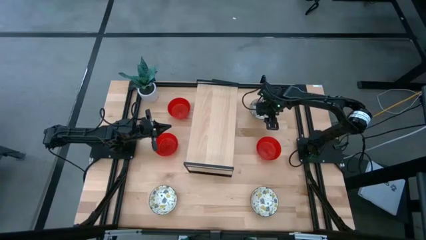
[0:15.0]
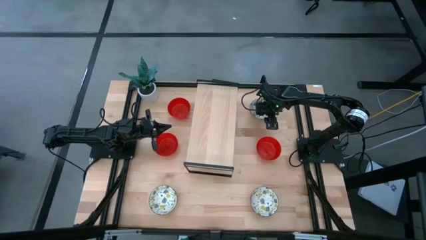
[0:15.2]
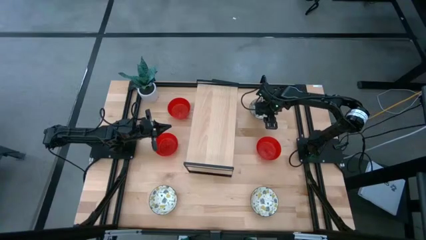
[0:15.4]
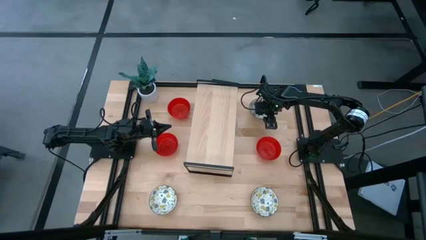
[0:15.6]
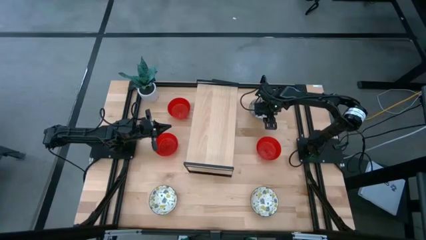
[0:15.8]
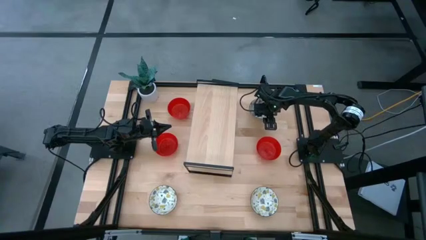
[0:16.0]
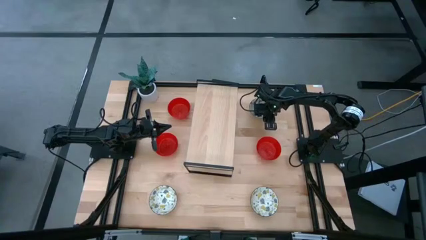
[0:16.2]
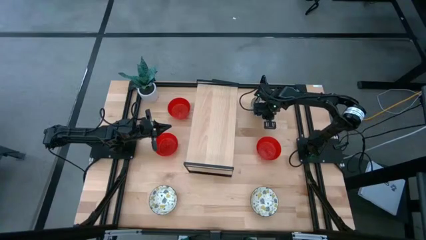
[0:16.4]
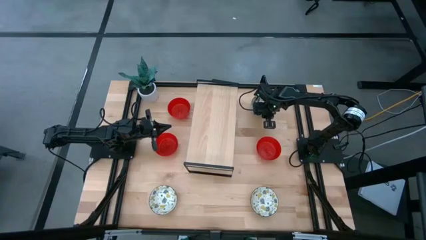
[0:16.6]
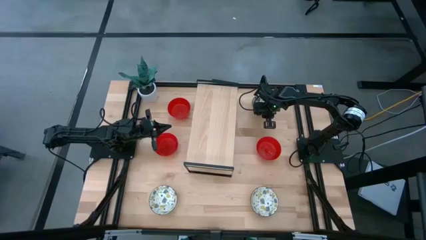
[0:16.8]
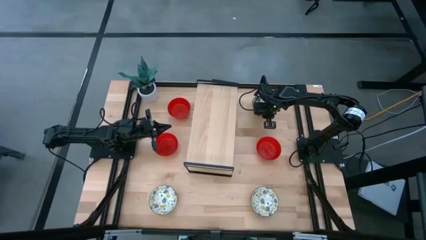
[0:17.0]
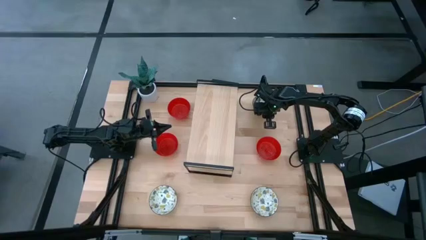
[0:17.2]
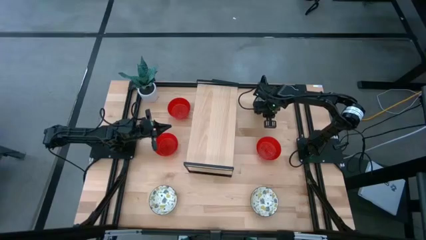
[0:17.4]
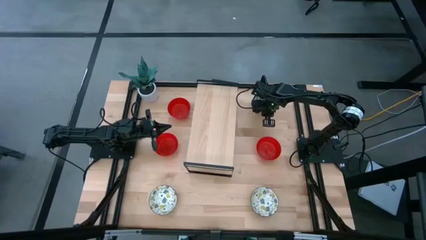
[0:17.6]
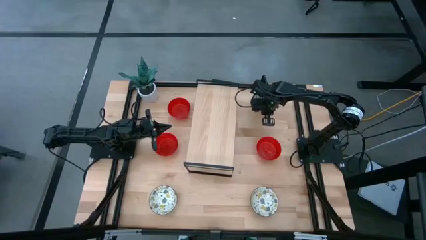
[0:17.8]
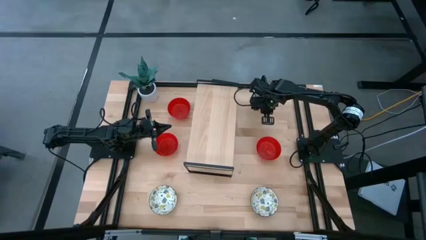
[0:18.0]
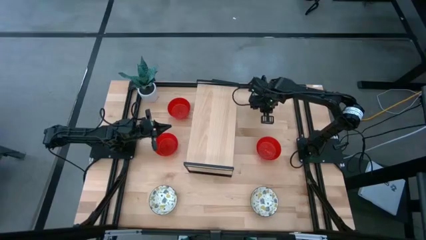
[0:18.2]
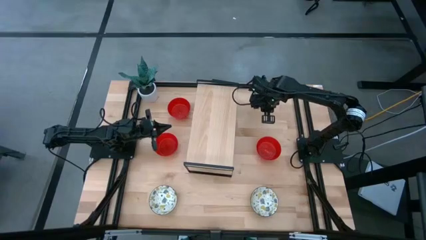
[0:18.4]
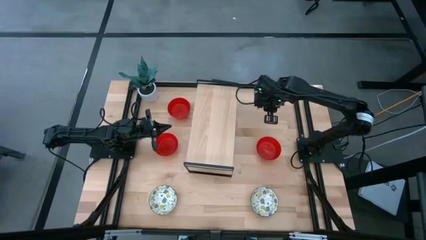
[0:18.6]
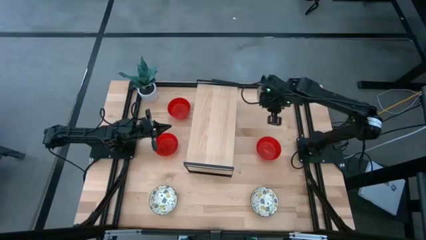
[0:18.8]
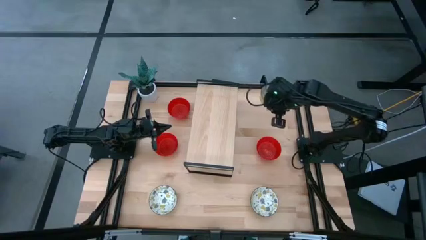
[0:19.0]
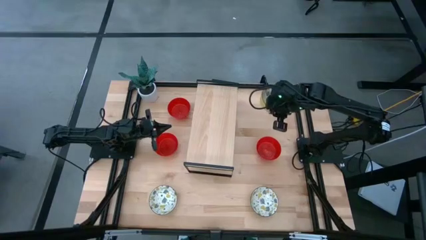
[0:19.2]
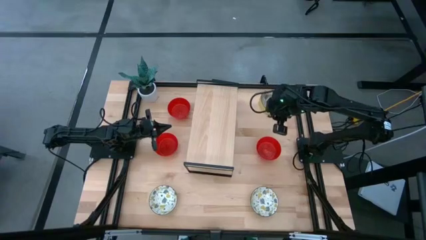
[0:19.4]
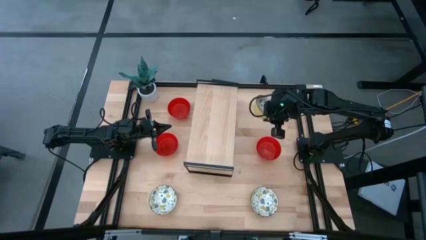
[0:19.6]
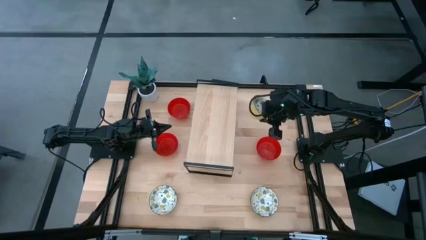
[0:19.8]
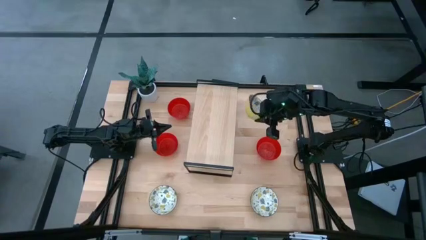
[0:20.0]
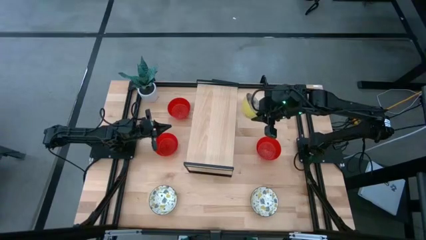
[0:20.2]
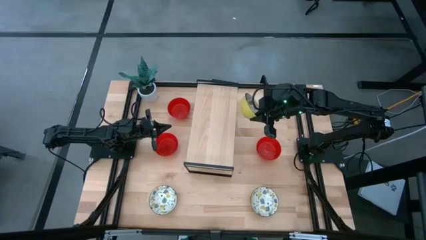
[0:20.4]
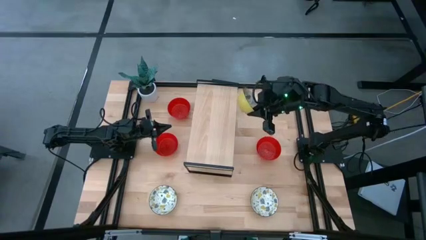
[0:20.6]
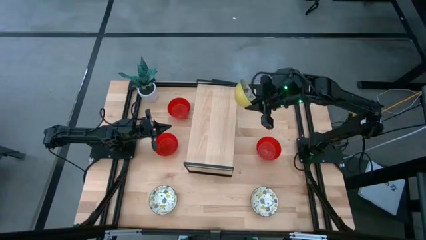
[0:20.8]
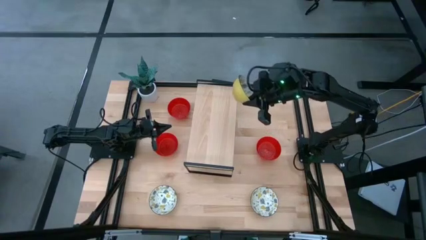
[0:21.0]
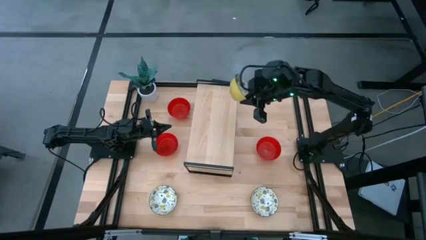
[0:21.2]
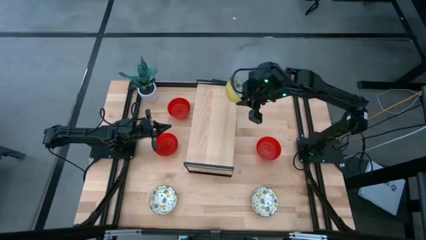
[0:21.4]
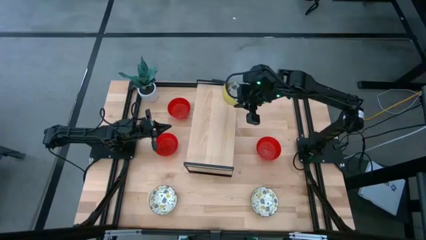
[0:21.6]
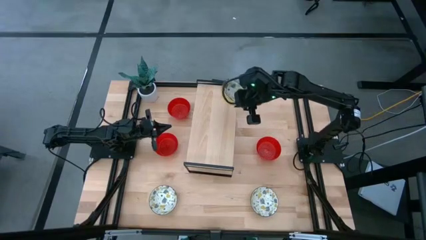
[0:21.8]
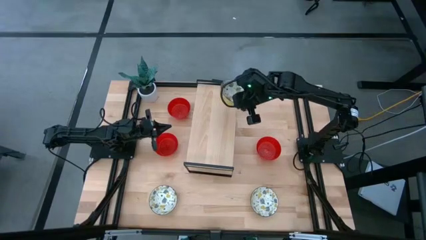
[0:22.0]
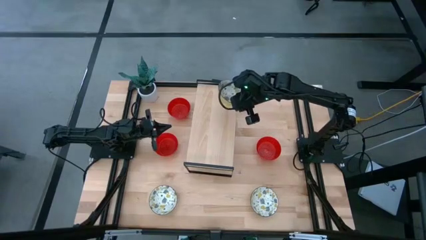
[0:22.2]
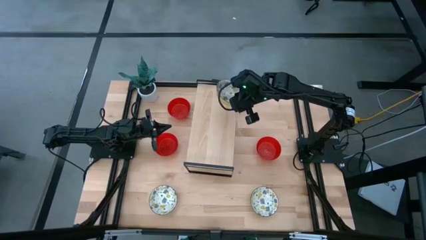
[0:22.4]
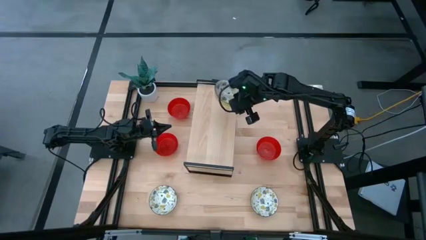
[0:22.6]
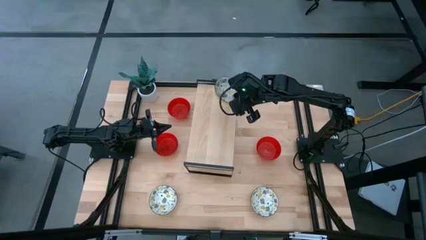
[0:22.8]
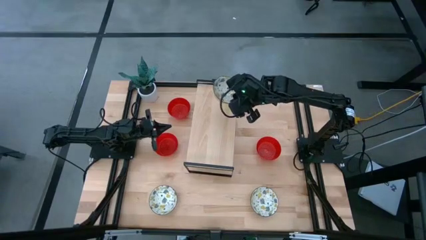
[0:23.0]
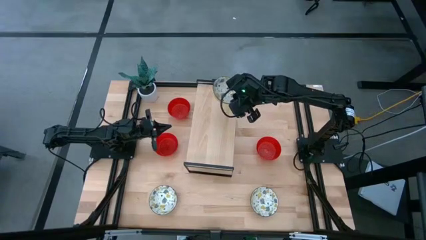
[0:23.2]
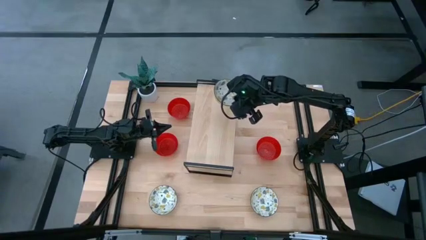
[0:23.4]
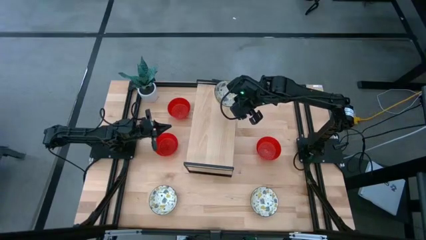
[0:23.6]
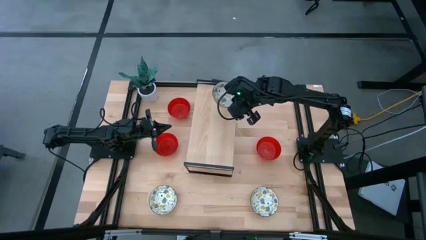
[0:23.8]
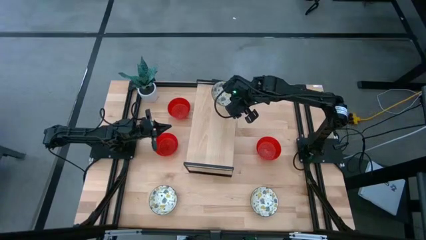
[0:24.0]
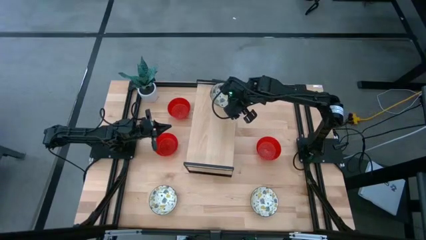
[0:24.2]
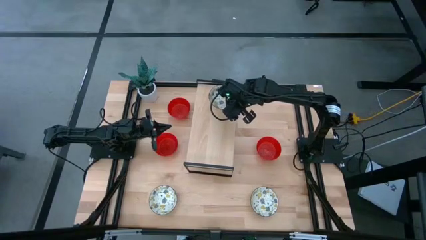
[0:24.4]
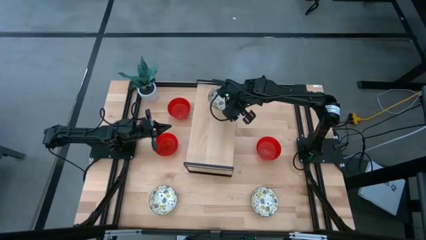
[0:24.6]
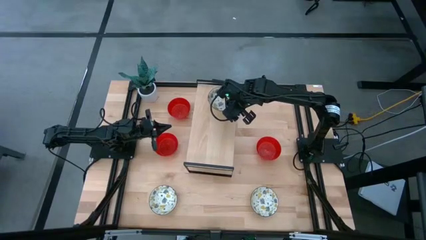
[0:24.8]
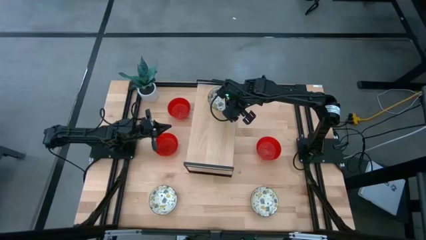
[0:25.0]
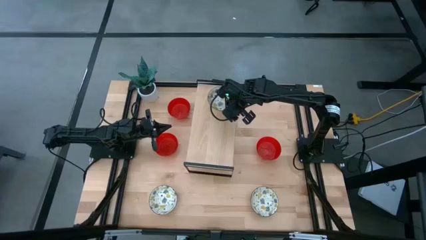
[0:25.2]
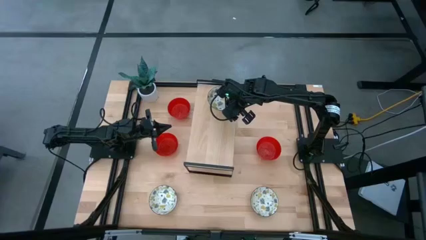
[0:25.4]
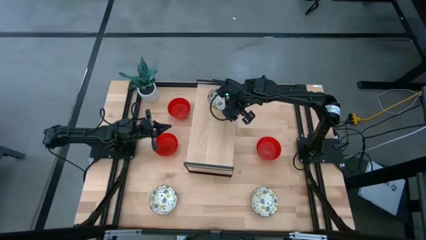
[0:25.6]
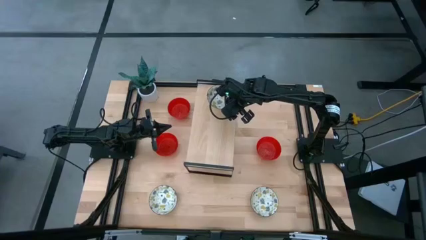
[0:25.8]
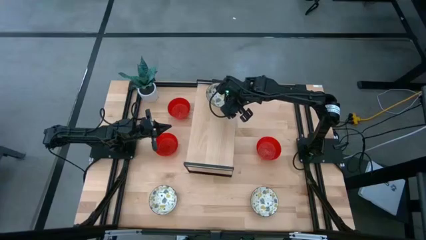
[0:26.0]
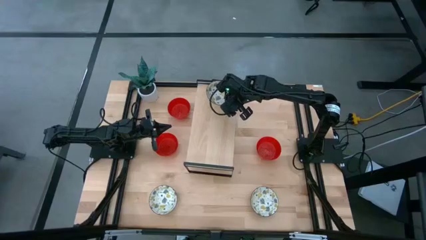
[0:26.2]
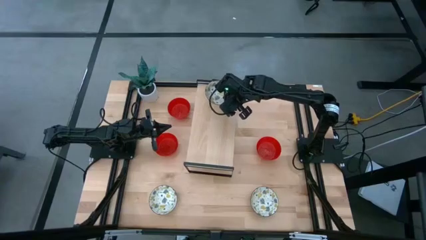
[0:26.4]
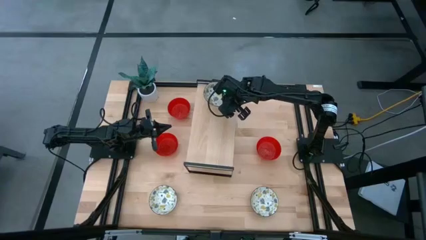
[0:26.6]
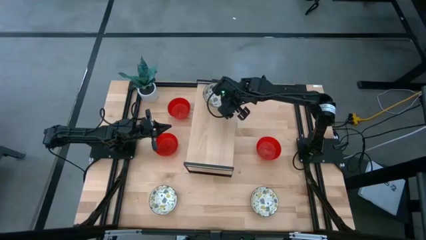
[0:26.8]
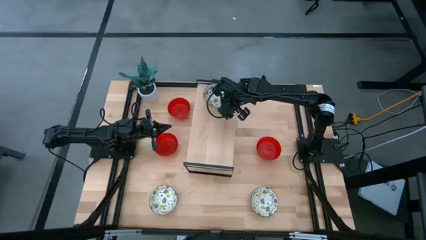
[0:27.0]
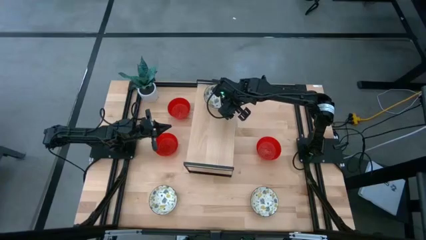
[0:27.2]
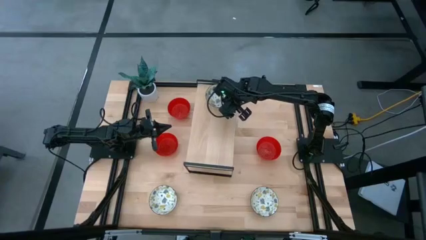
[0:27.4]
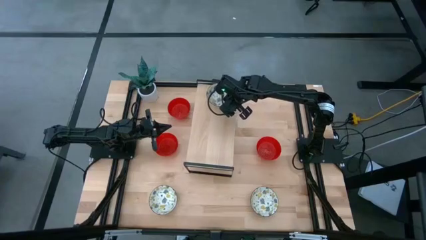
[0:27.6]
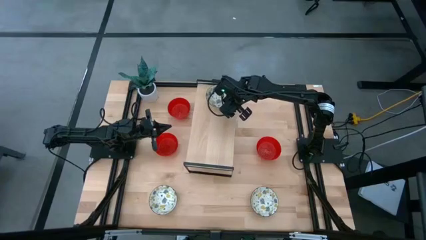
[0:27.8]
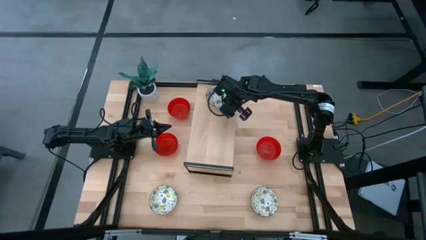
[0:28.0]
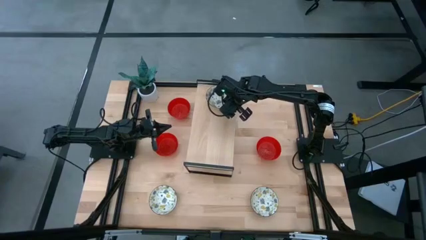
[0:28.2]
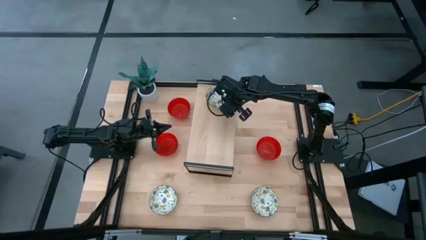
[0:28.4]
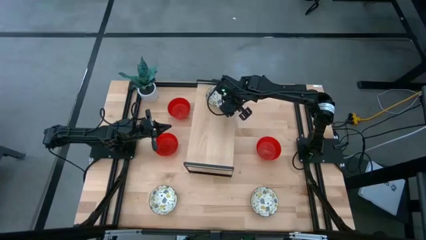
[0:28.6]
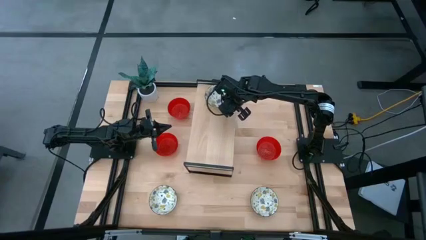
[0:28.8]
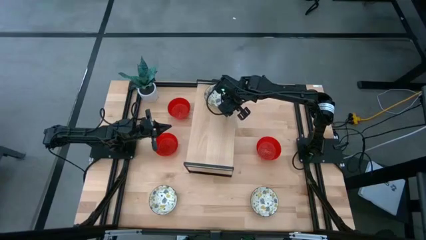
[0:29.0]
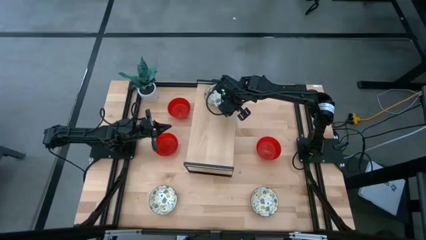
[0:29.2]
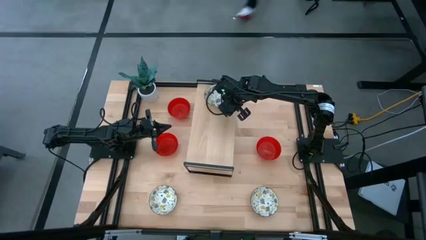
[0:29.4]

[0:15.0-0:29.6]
Task: Pick & Place Mini bowls
Put the top white patterned bowl on the shelf
